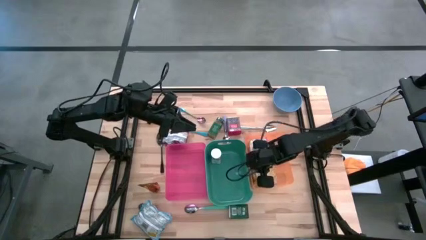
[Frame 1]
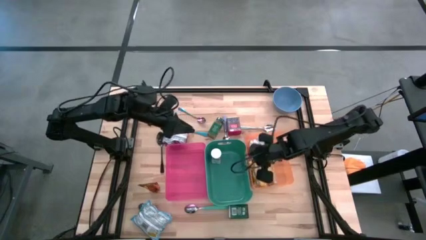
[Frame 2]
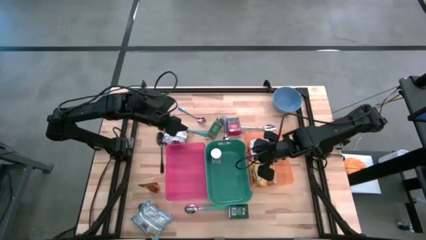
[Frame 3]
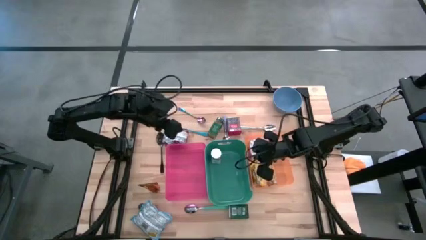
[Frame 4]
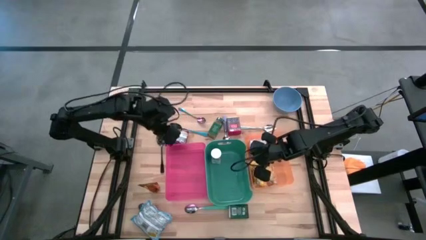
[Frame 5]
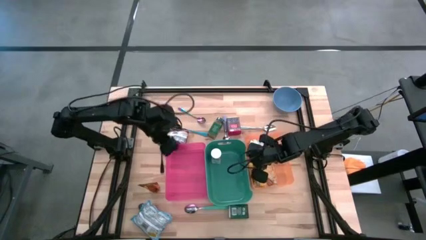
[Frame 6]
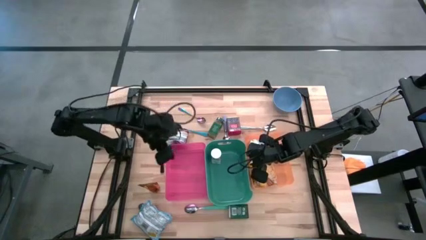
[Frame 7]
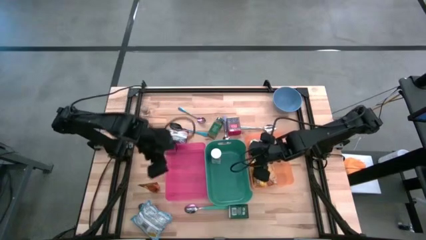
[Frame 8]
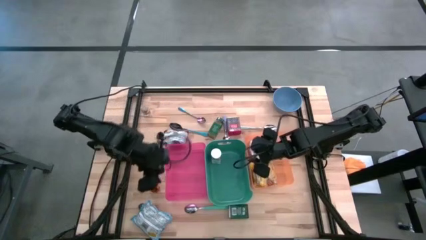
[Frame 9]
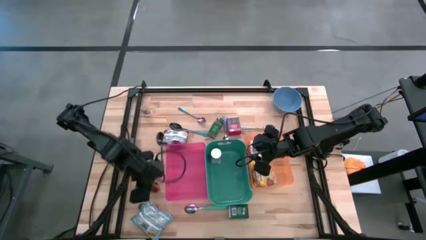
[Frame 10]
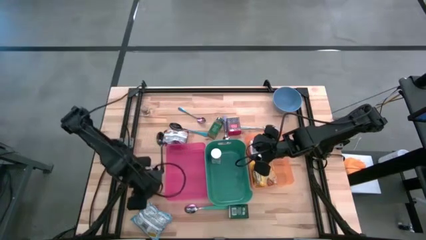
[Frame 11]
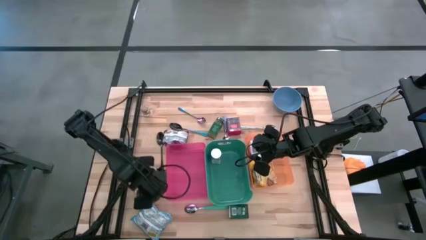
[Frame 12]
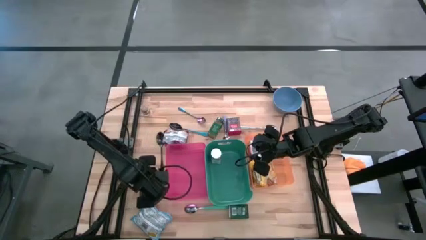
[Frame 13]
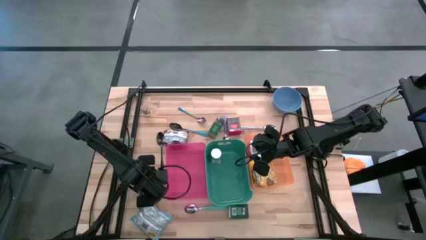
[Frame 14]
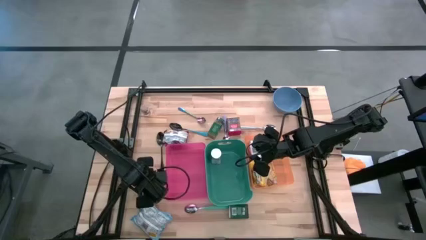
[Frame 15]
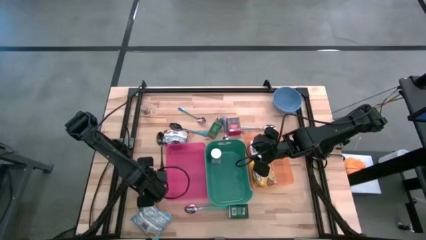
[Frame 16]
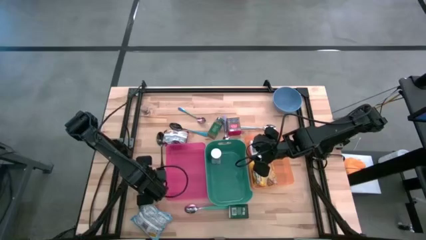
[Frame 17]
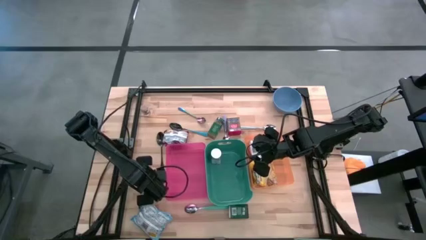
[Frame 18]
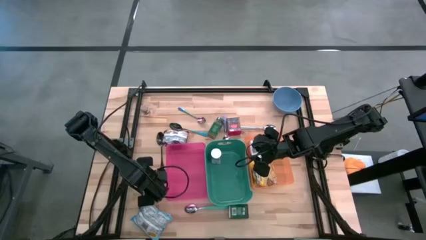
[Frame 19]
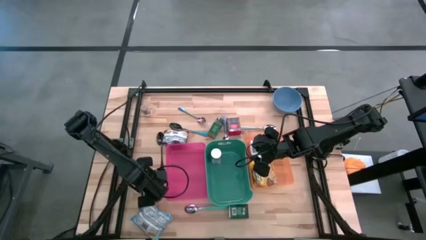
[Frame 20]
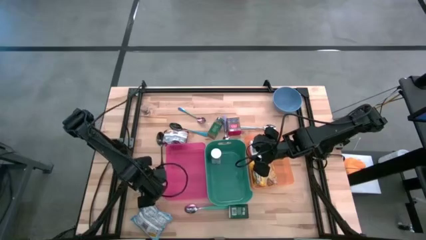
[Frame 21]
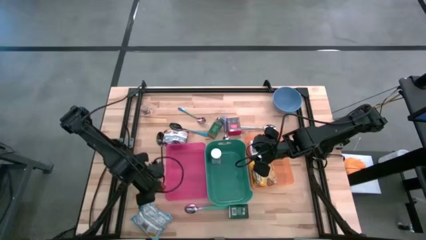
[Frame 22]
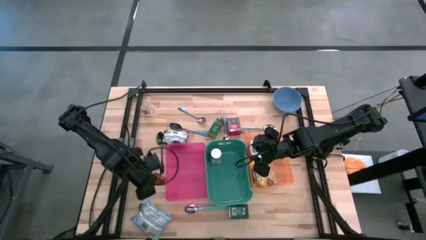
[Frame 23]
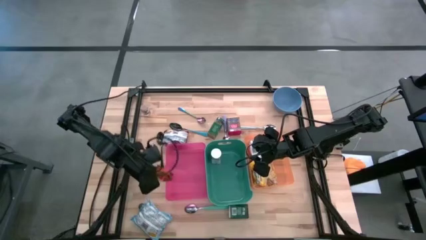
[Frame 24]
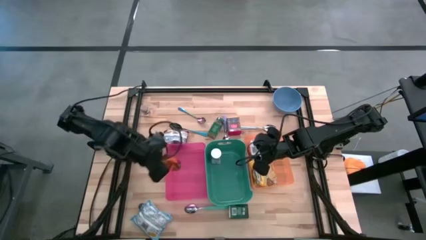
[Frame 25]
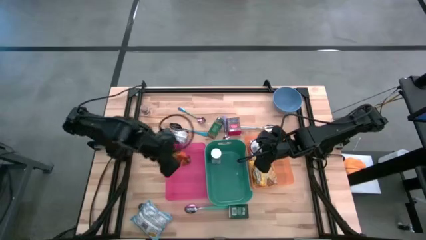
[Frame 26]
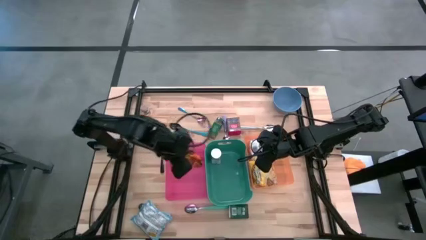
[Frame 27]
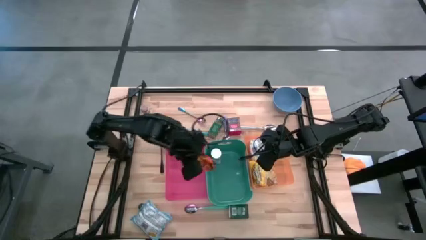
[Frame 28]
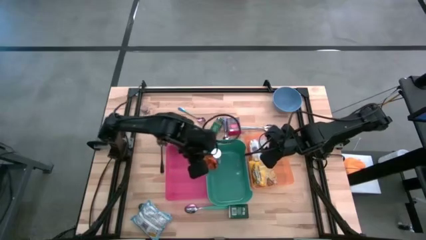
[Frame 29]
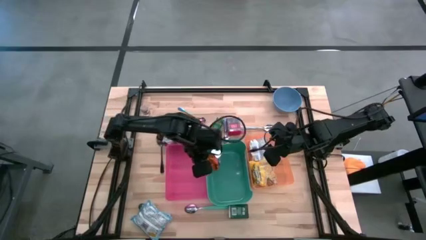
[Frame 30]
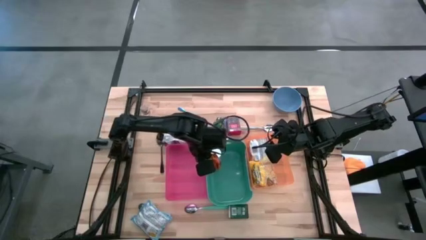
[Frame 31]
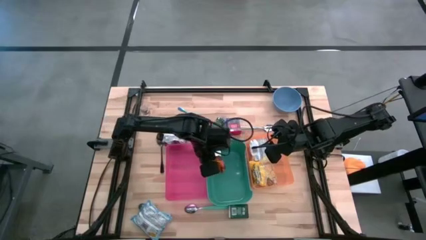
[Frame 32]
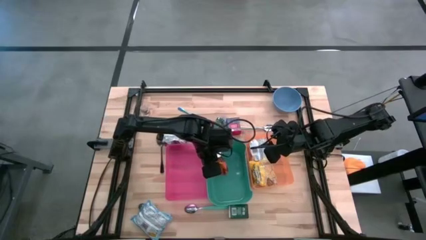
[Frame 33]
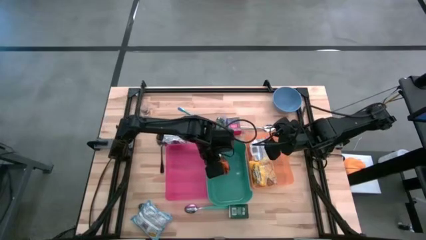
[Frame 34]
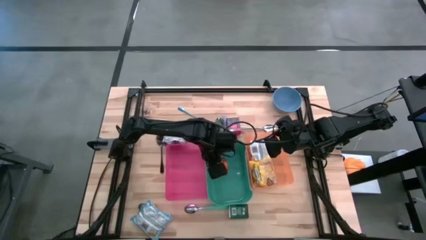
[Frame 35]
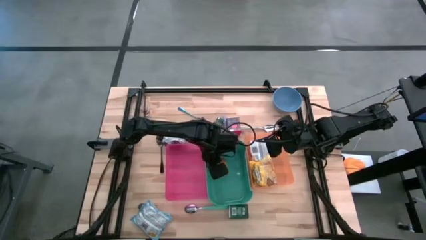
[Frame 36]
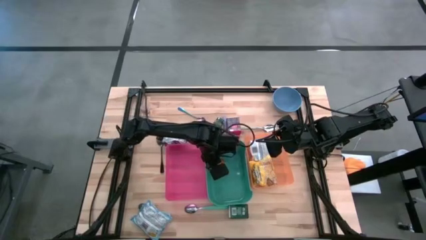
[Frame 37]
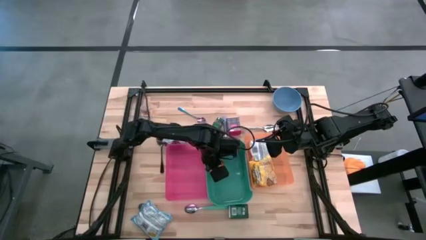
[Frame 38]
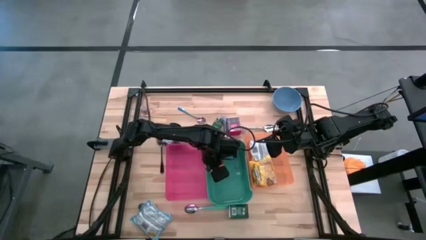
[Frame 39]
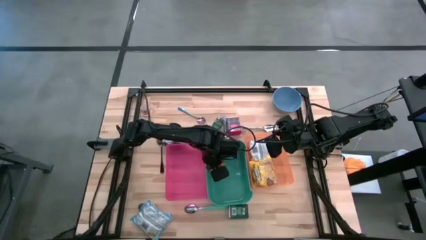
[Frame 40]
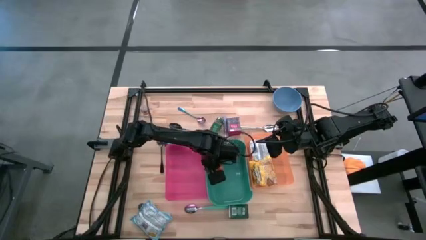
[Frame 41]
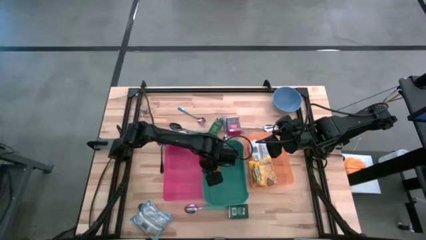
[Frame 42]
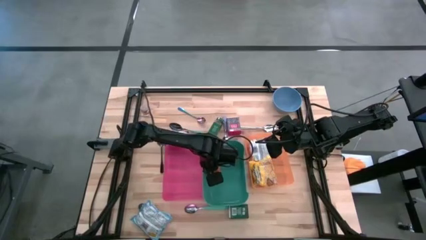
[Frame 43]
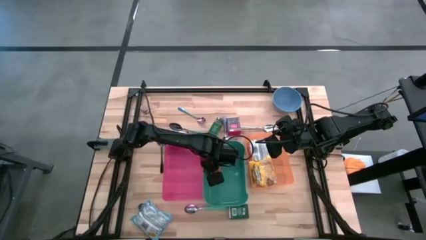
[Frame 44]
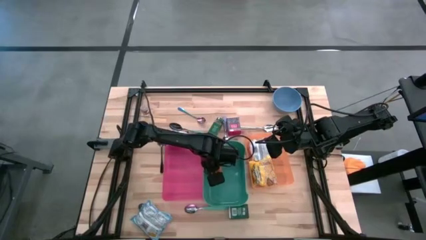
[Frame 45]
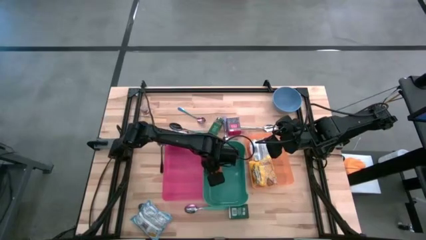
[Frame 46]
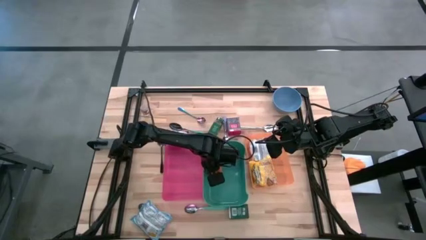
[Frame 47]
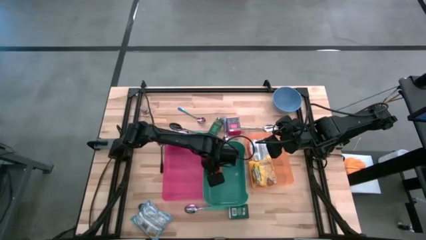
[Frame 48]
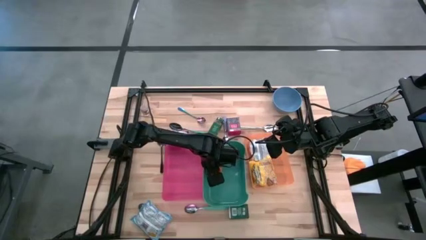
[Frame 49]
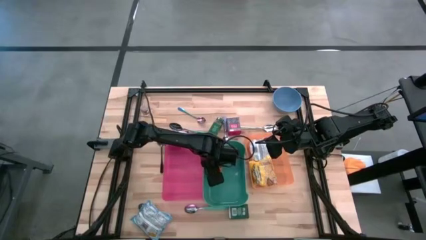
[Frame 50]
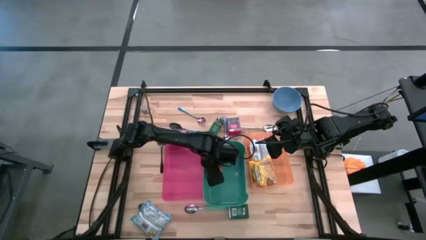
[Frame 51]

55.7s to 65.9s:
Put the orange seasoning pack into the green bin

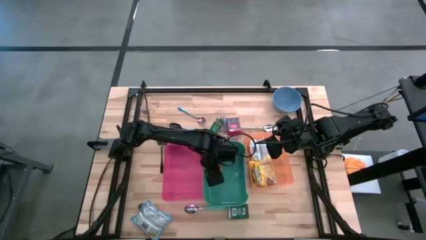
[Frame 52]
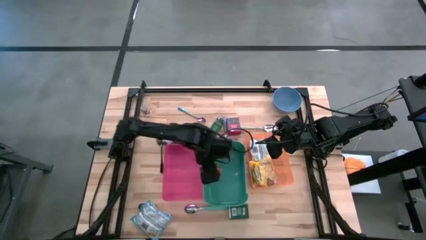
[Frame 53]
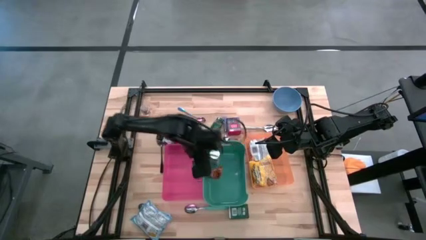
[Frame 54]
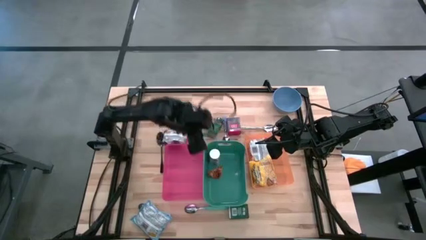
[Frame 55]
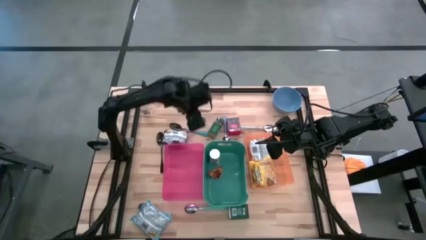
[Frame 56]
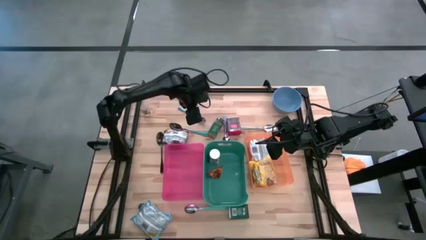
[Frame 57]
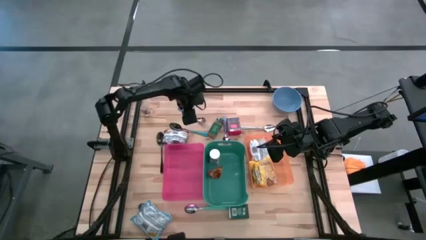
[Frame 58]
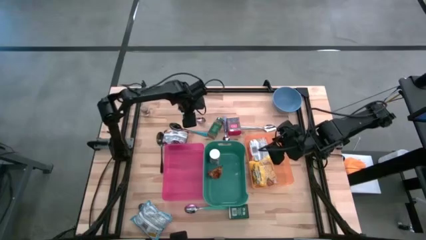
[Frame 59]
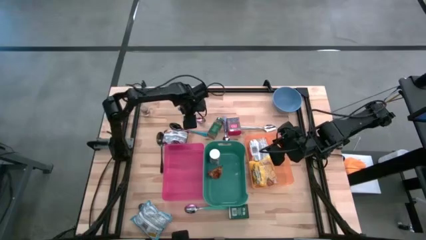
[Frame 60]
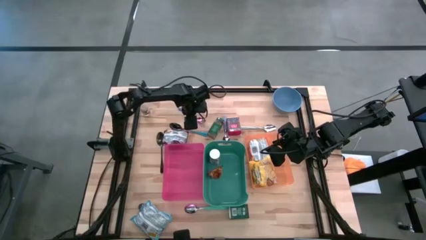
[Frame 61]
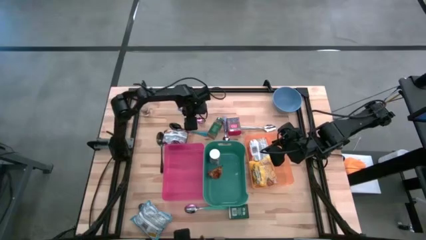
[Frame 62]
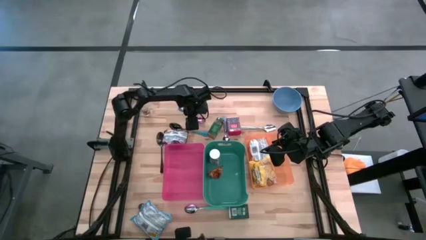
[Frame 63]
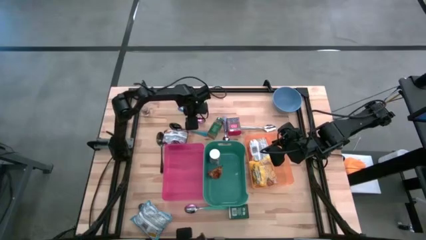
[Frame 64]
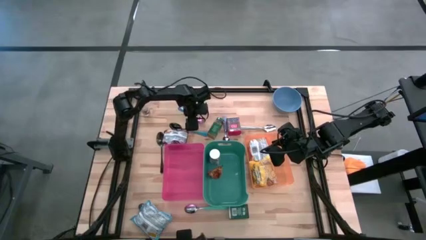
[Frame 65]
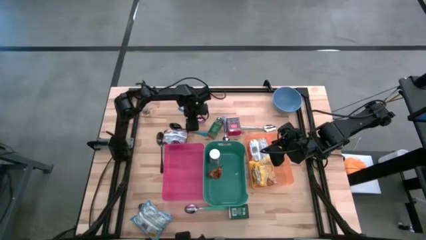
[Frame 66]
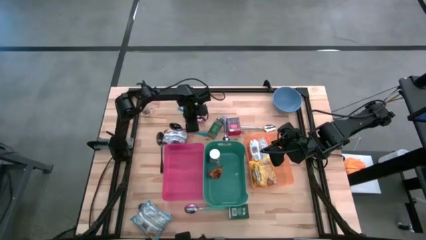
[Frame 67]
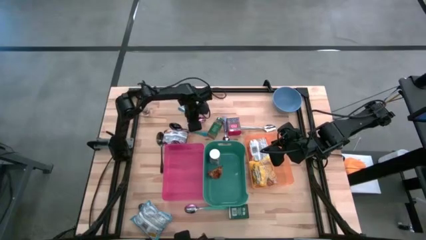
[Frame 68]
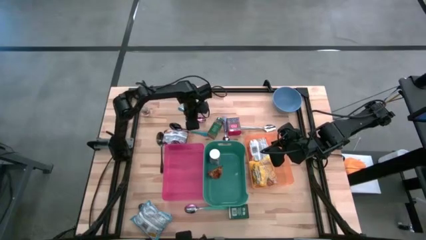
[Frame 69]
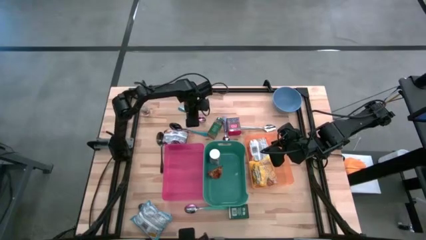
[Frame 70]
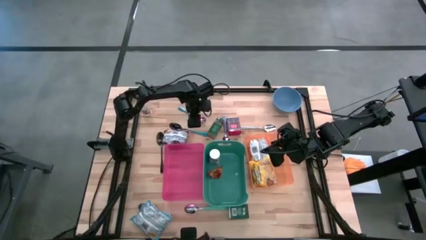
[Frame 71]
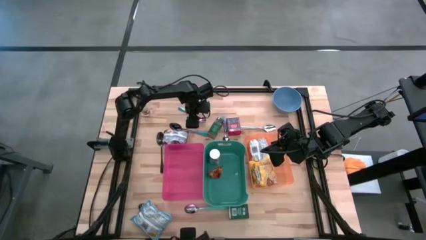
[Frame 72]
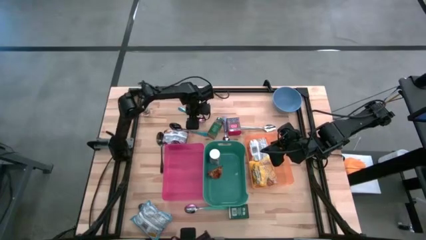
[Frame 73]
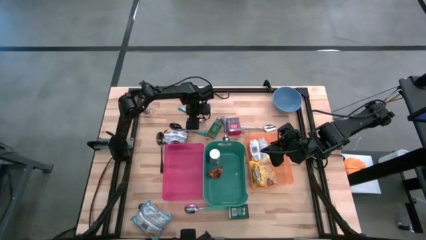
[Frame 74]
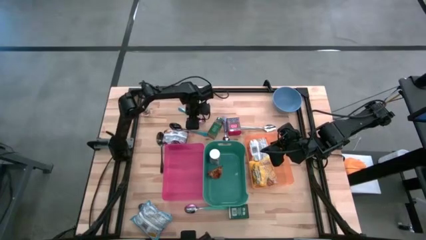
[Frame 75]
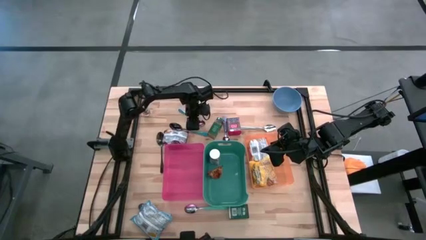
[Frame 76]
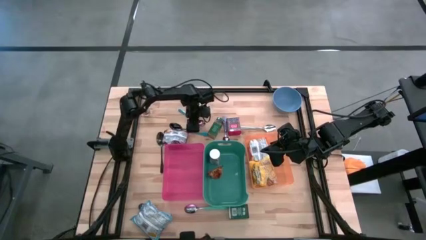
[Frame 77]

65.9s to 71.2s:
Put the blue and purple spoon into the pink bin
